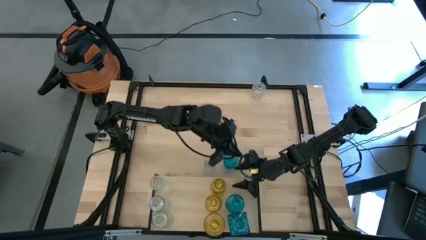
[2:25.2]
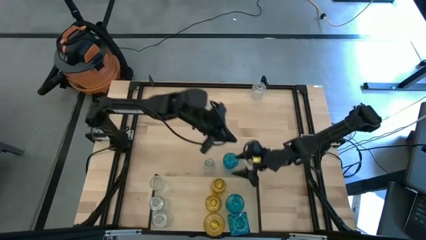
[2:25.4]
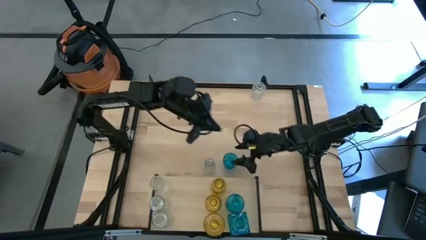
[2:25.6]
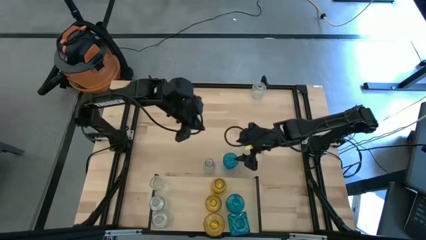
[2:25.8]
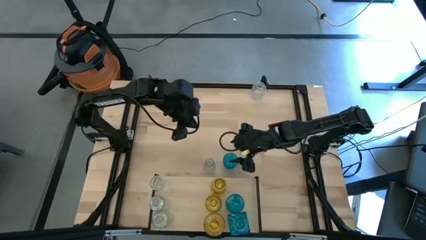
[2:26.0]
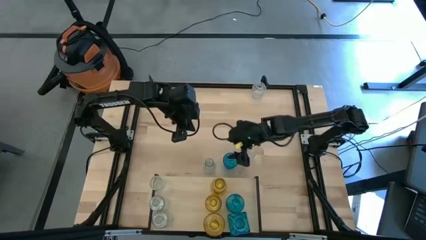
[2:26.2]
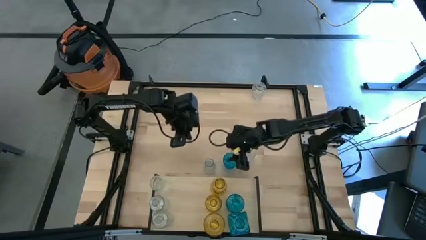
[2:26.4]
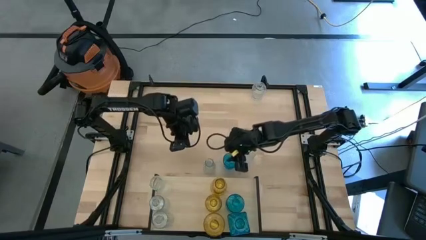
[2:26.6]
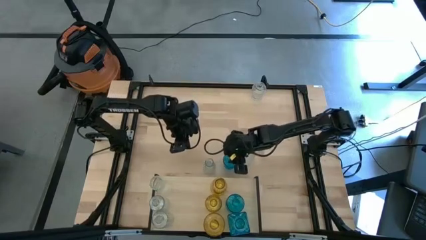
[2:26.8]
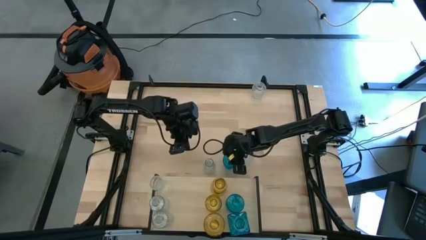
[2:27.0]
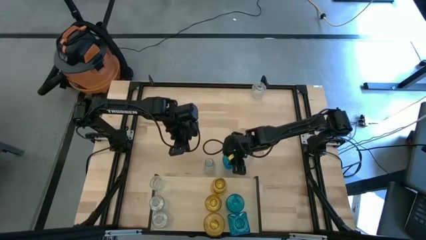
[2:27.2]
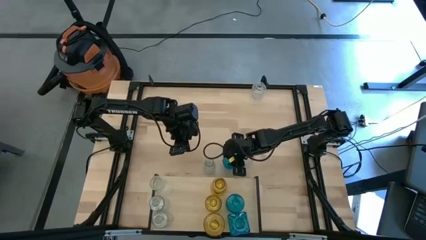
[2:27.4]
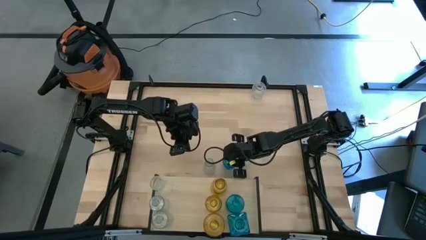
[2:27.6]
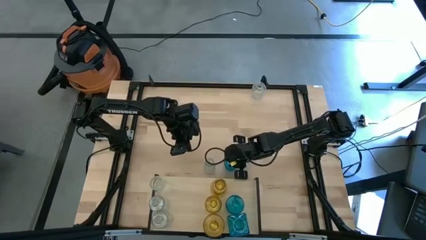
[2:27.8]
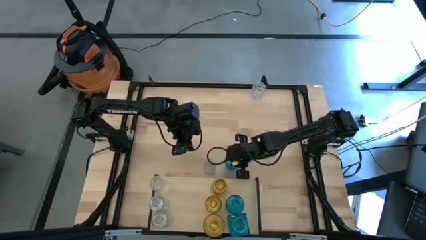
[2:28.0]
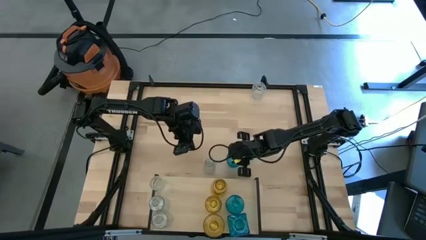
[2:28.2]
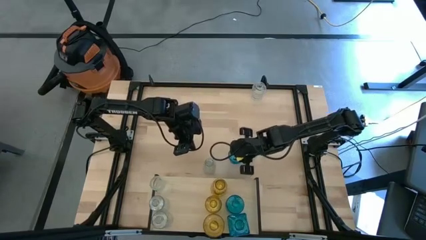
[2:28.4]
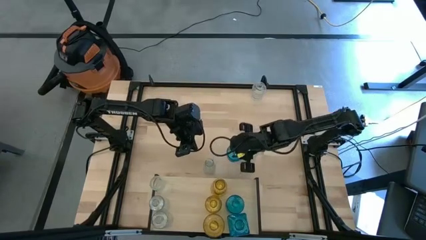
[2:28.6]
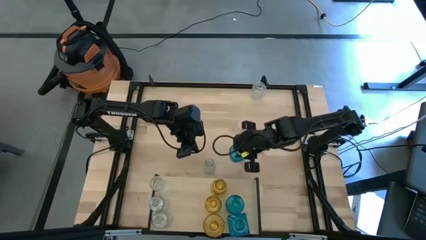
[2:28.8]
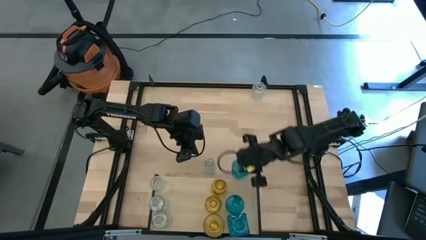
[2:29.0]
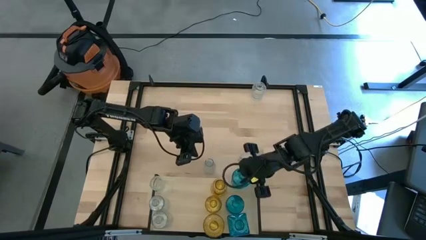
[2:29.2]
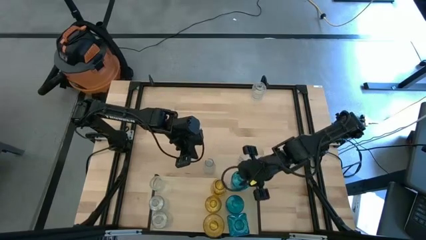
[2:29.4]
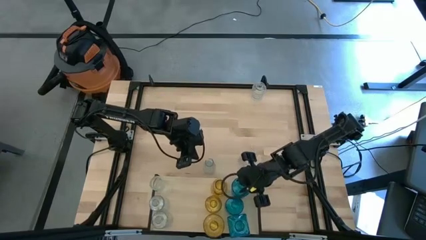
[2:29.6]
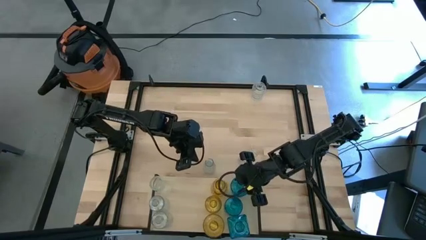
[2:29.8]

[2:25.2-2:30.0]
Task: sort vases onto shelf
Put the blue vase on the shelf aligned with the other blue vase

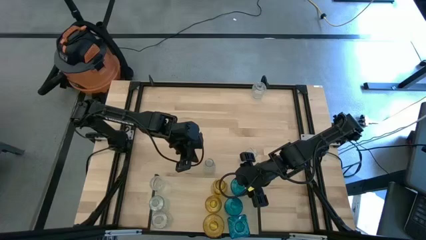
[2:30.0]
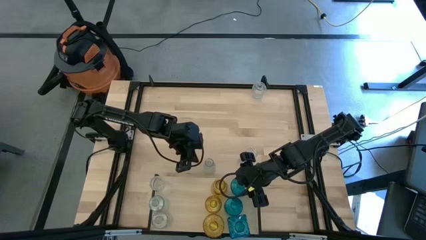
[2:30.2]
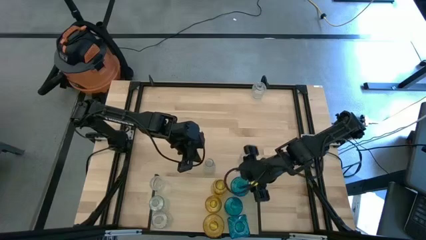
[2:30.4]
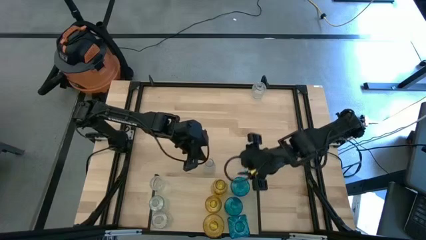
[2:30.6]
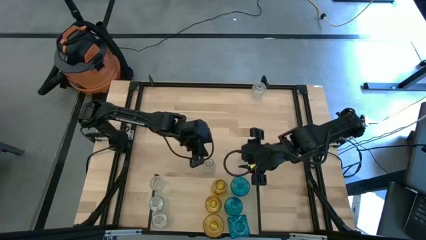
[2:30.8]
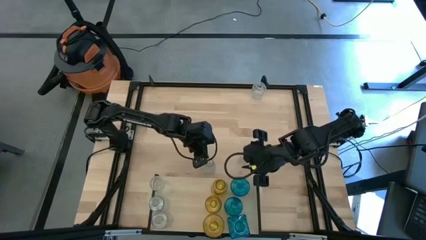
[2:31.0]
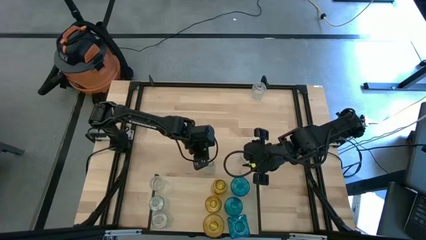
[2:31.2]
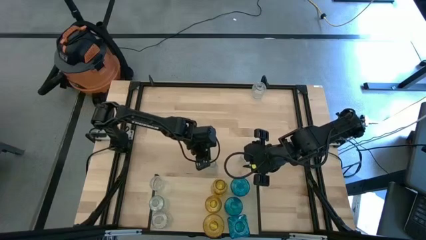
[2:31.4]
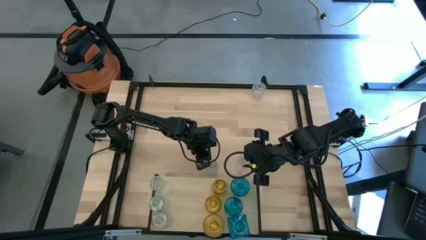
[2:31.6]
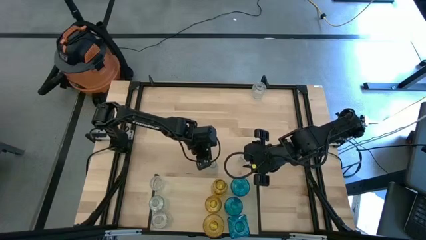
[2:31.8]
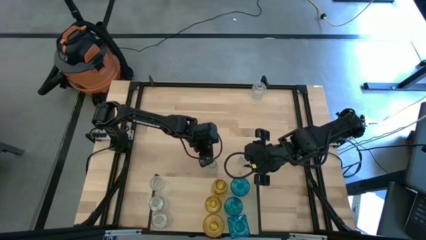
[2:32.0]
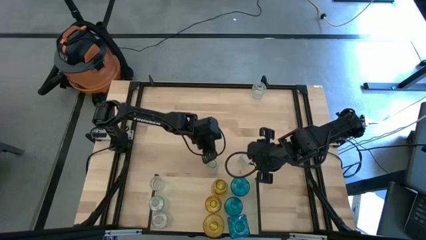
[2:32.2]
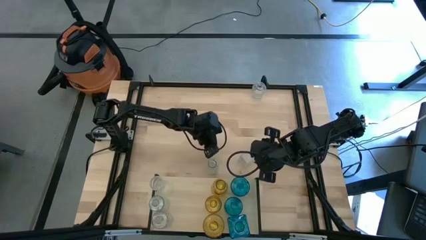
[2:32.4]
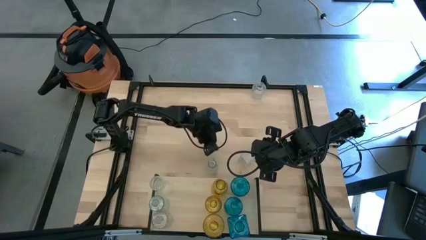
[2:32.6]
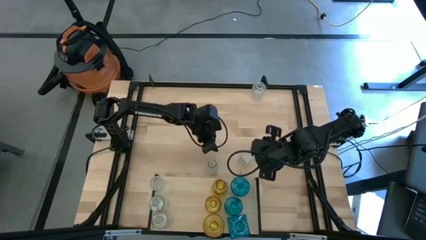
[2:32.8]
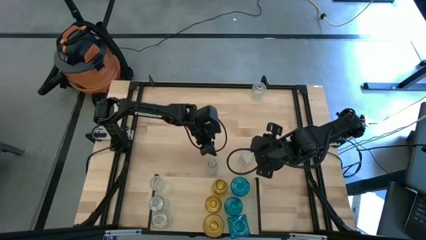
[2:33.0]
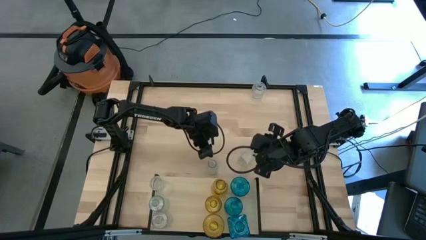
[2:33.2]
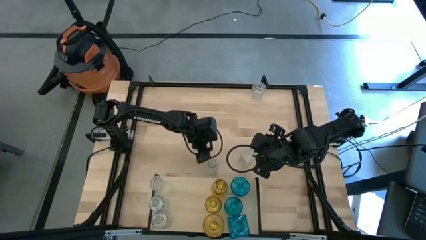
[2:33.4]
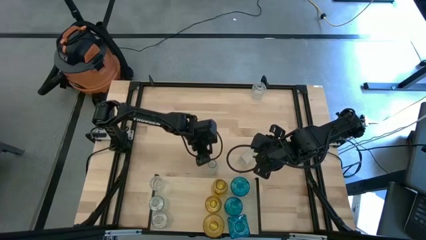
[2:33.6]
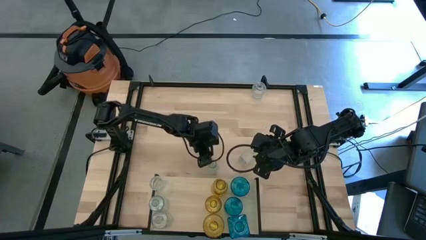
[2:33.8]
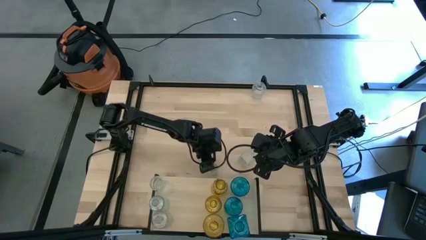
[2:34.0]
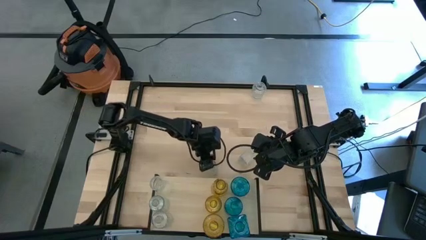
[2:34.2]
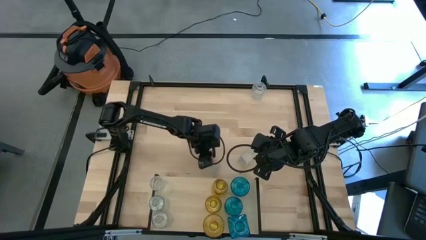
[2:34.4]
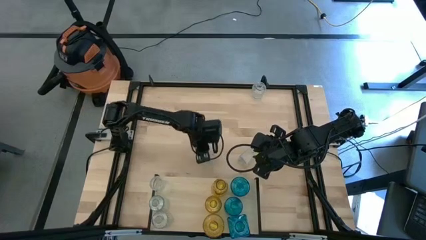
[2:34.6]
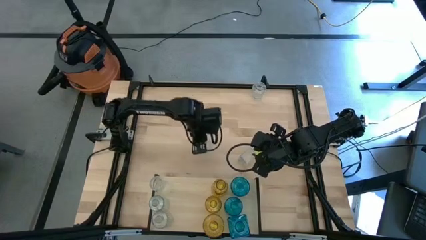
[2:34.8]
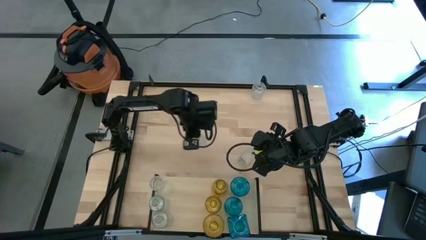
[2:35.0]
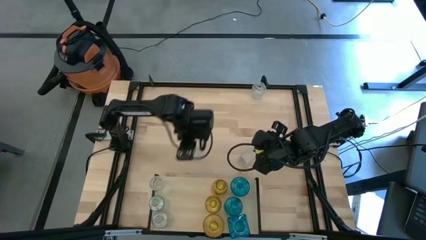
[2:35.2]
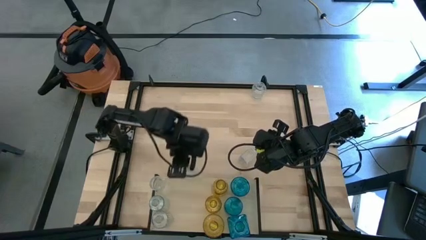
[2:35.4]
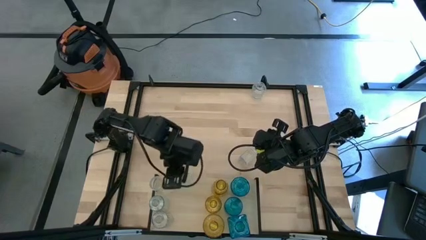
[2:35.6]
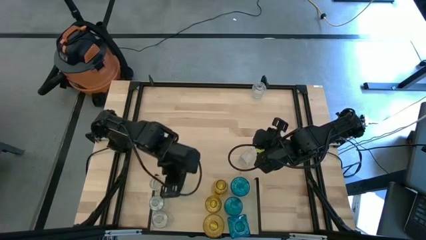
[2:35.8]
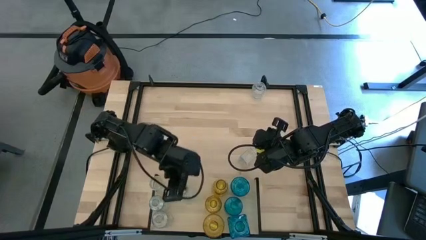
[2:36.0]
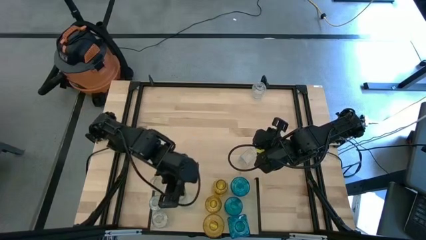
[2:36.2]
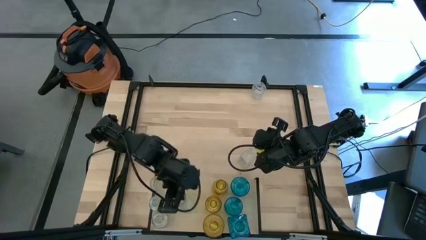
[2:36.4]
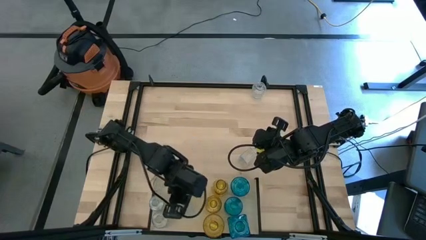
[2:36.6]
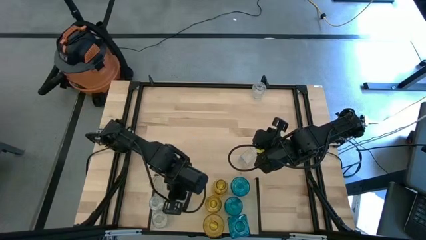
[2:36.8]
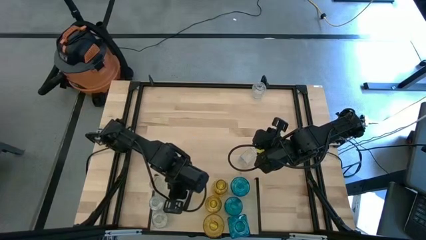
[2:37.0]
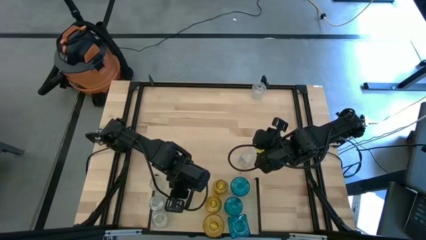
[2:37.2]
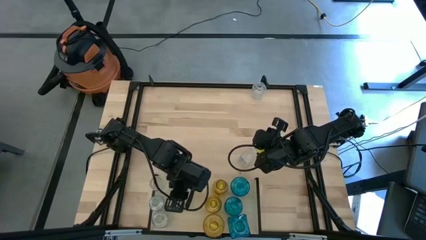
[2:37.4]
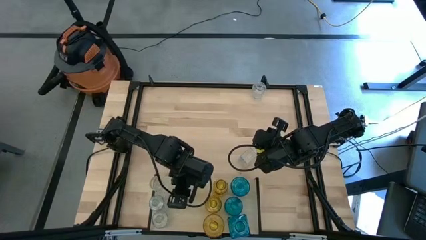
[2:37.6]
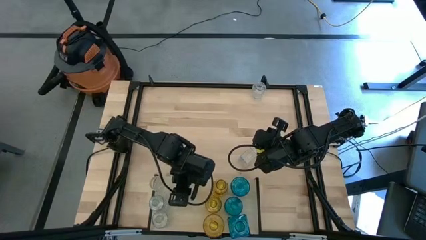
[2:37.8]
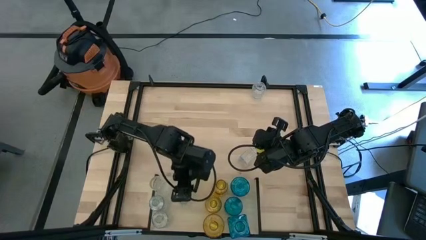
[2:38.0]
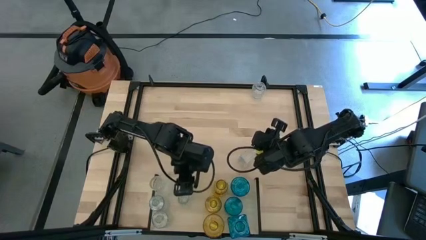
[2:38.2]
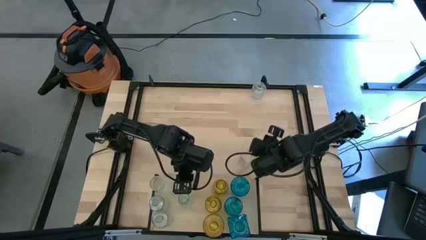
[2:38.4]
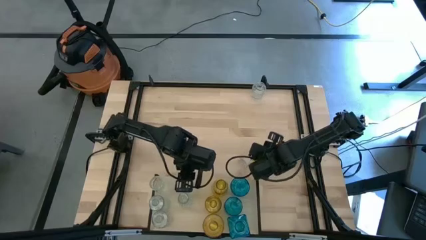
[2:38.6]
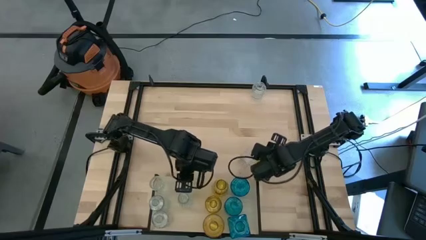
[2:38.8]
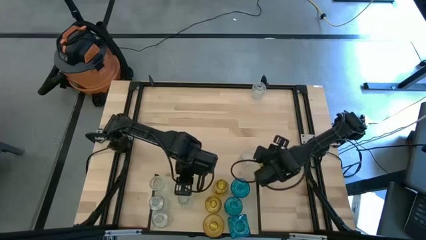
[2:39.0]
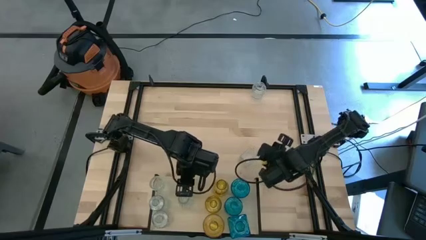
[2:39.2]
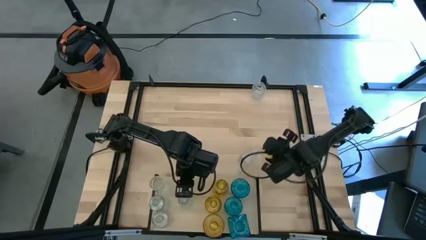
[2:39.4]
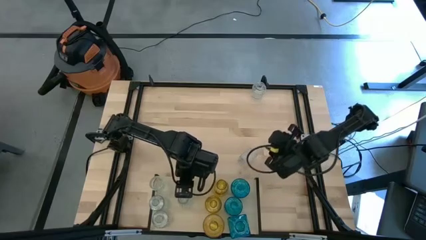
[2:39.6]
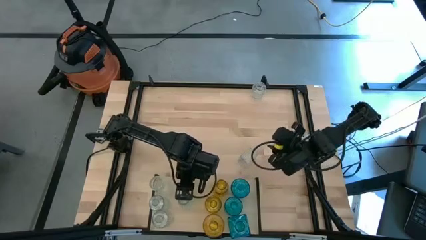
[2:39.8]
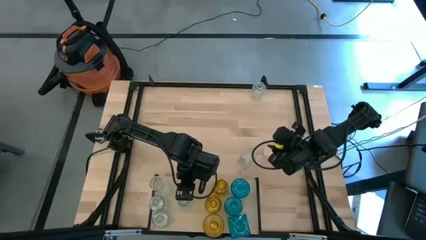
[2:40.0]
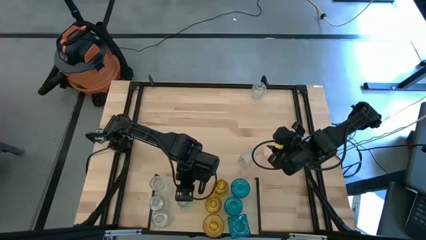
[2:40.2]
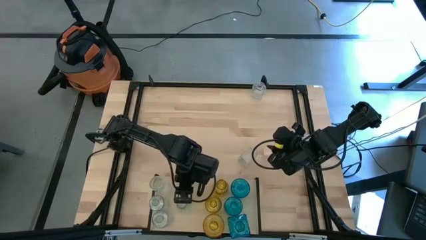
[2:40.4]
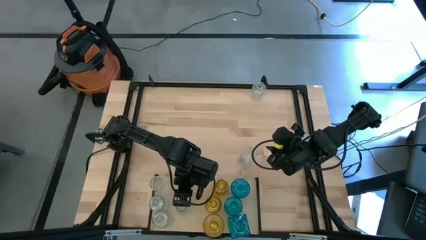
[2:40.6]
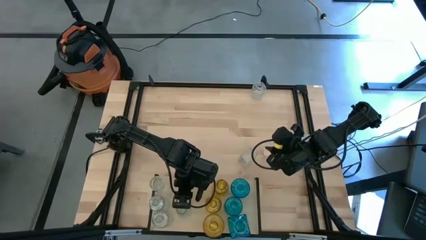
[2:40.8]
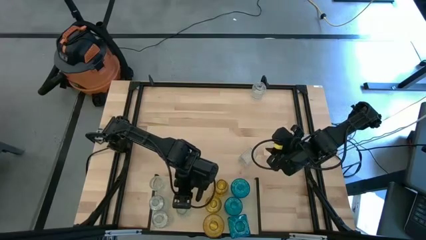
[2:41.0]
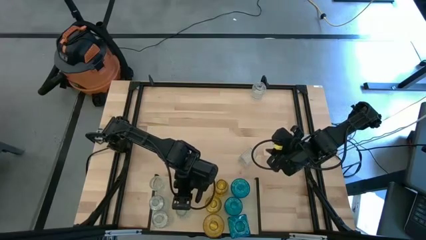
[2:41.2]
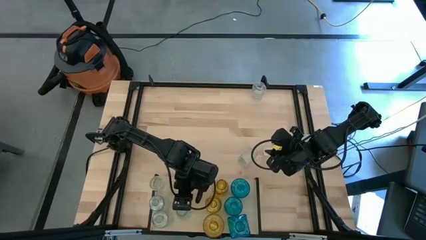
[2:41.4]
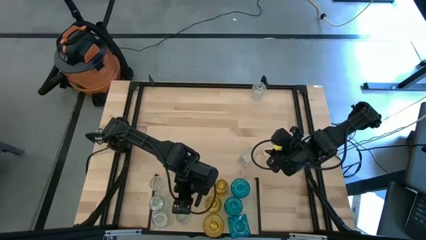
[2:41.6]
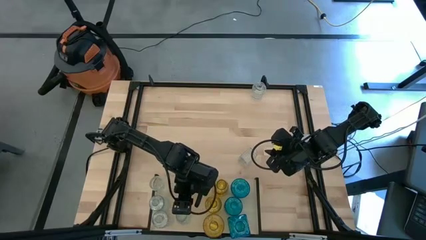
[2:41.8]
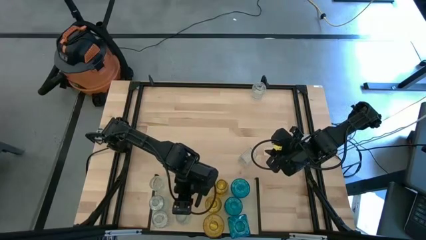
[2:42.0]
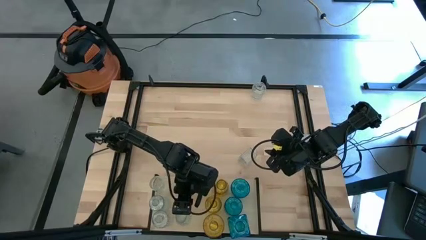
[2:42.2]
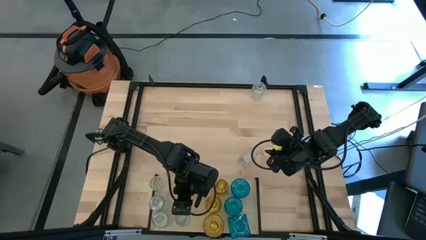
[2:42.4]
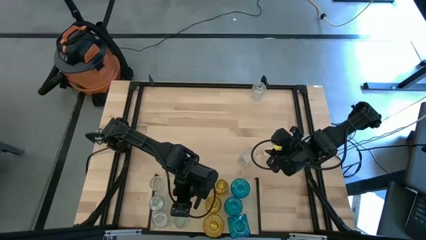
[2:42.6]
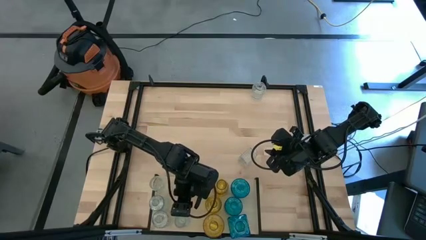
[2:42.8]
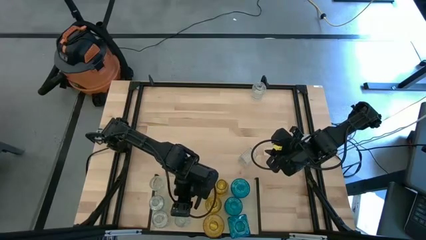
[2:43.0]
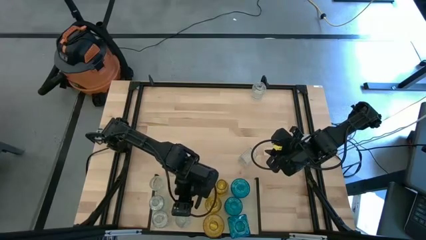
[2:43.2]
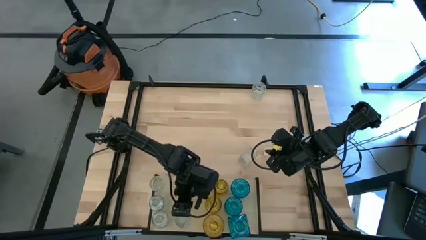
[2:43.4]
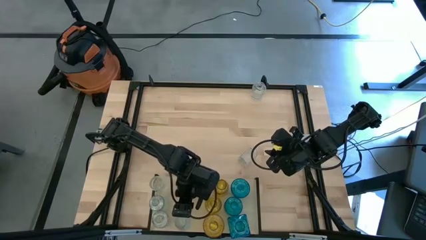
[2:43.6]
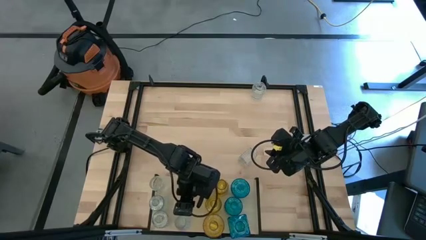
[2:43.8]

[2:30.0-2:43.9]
Put the transparent vase on the shelf
